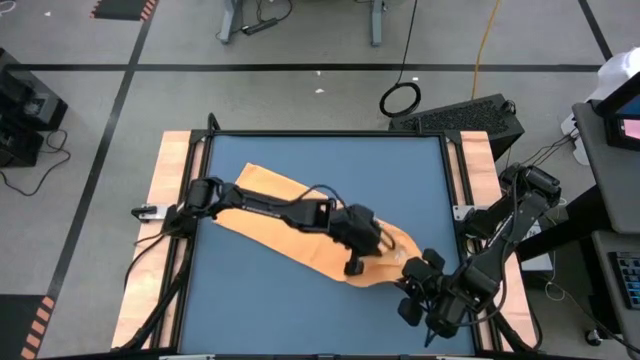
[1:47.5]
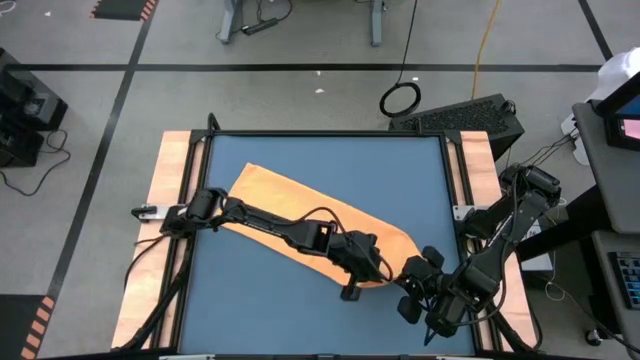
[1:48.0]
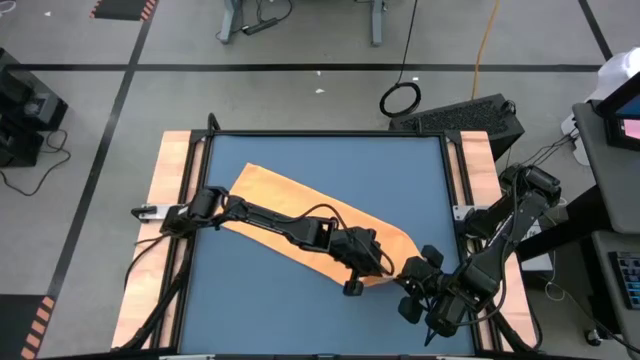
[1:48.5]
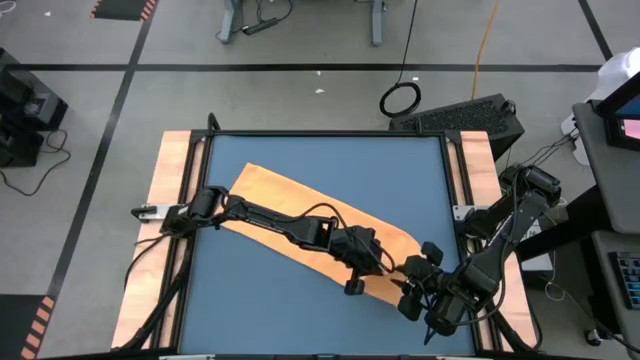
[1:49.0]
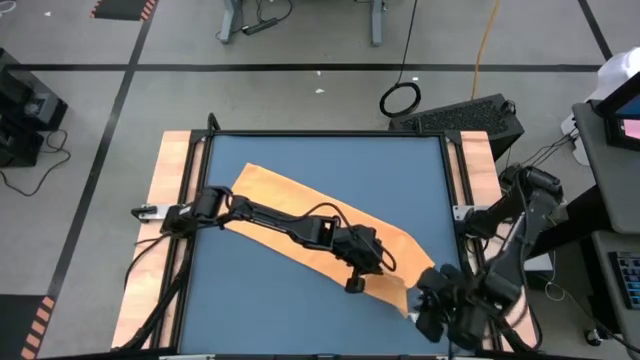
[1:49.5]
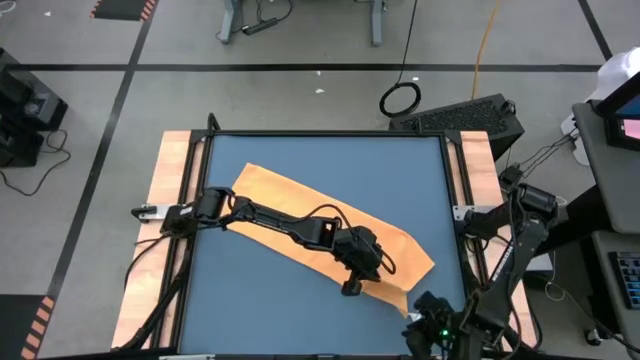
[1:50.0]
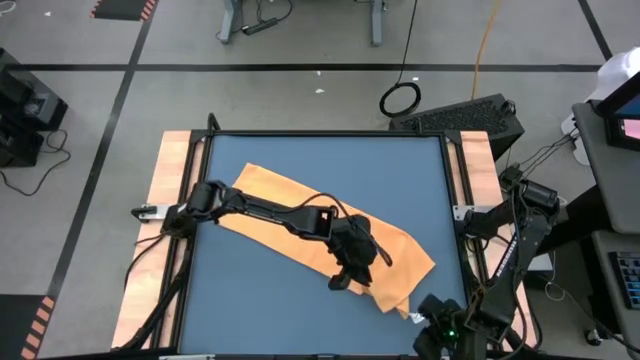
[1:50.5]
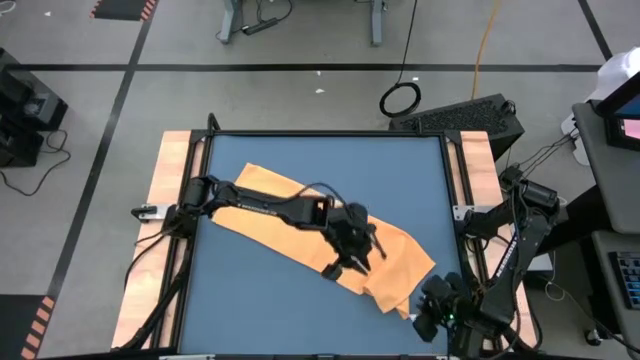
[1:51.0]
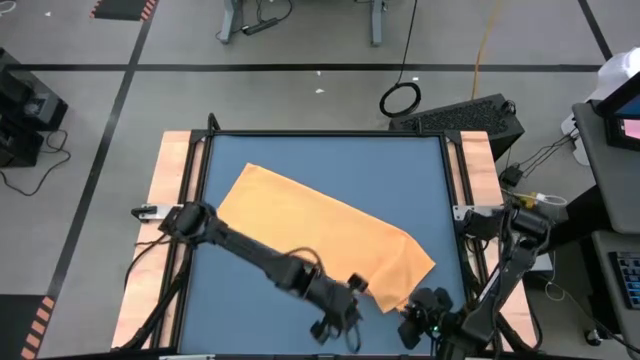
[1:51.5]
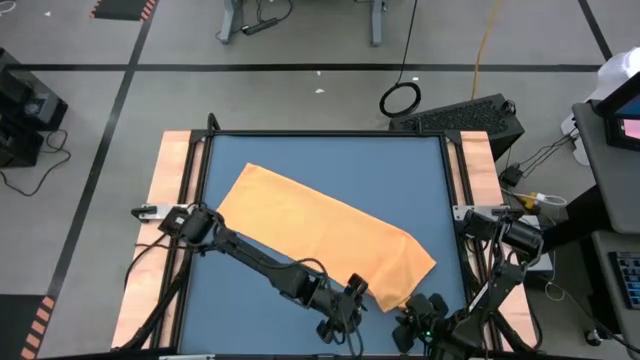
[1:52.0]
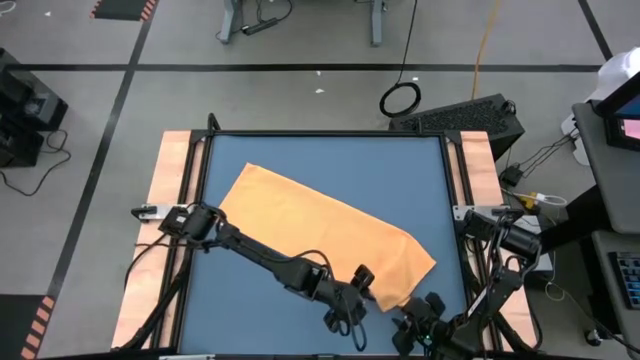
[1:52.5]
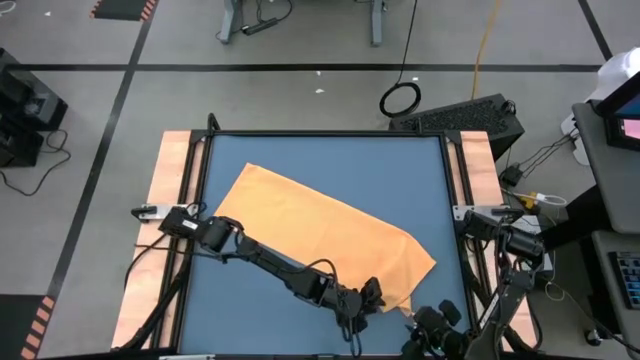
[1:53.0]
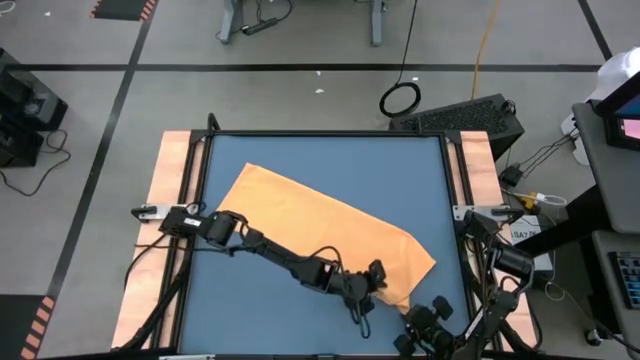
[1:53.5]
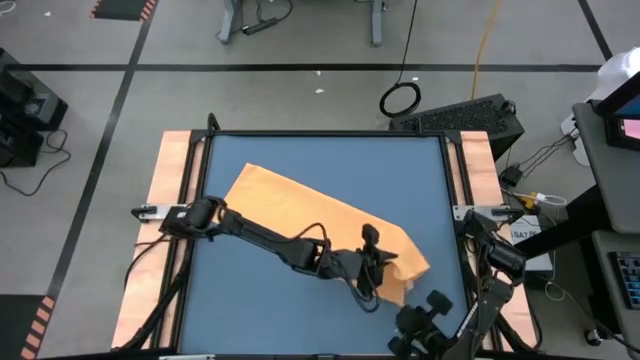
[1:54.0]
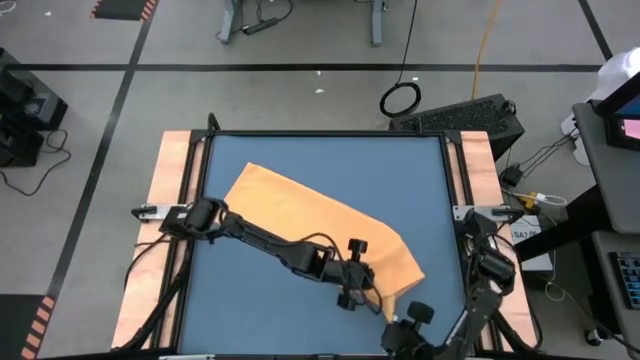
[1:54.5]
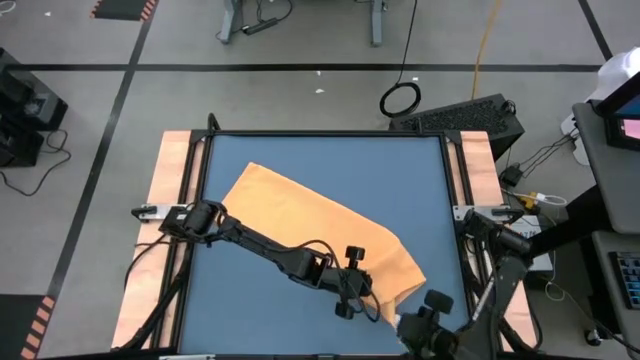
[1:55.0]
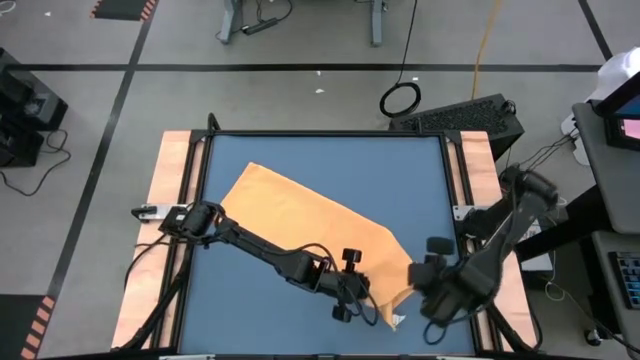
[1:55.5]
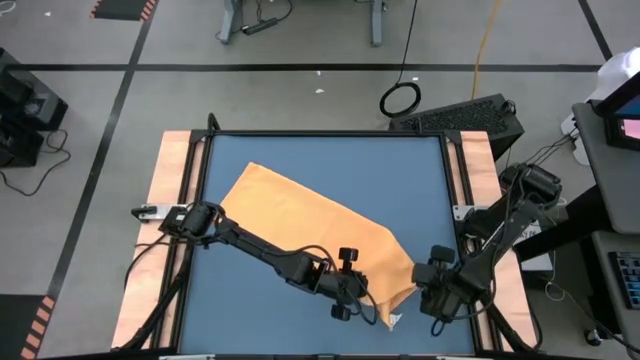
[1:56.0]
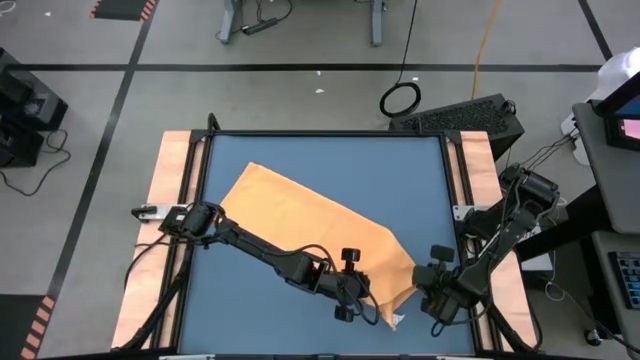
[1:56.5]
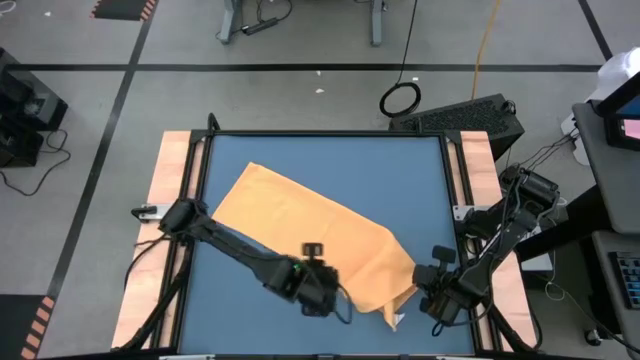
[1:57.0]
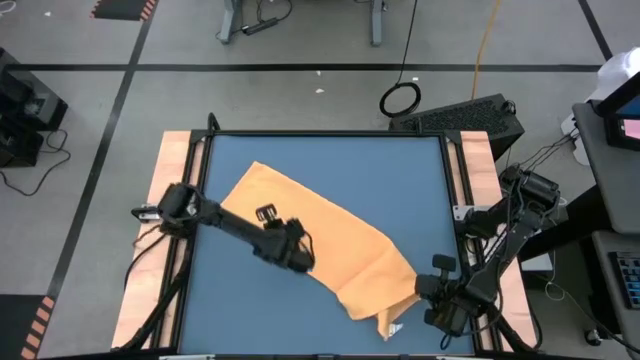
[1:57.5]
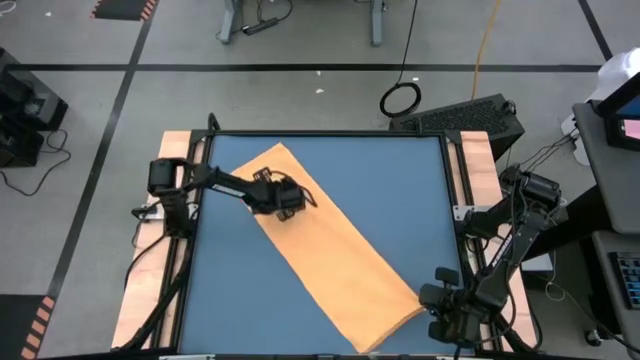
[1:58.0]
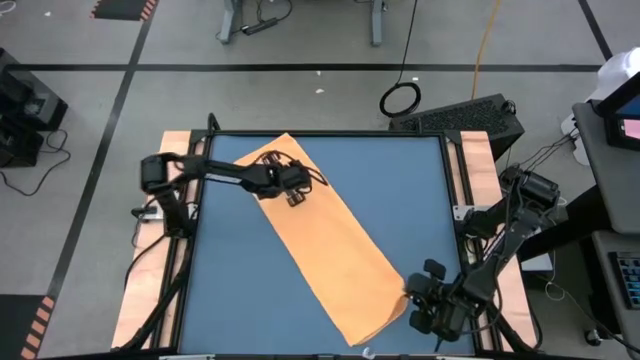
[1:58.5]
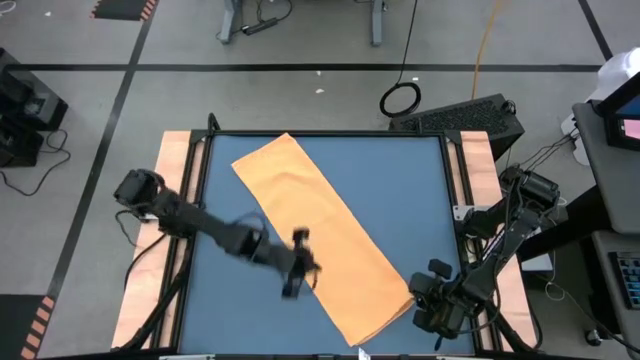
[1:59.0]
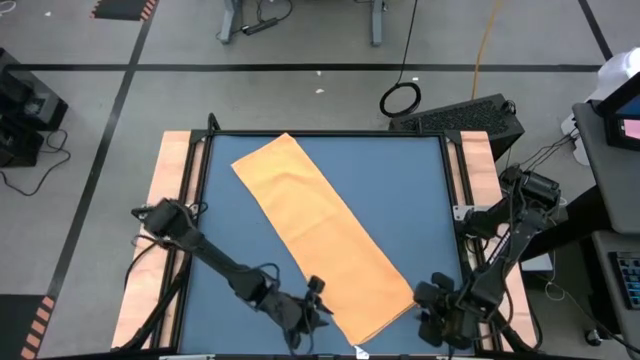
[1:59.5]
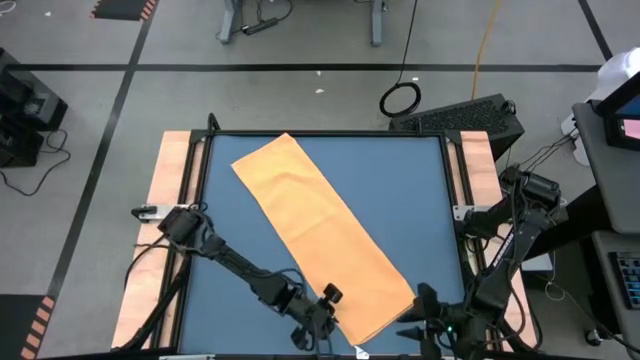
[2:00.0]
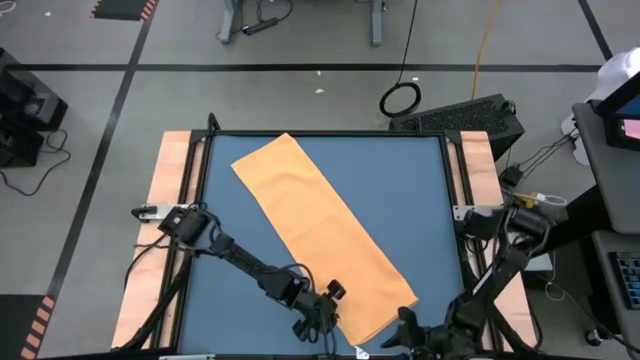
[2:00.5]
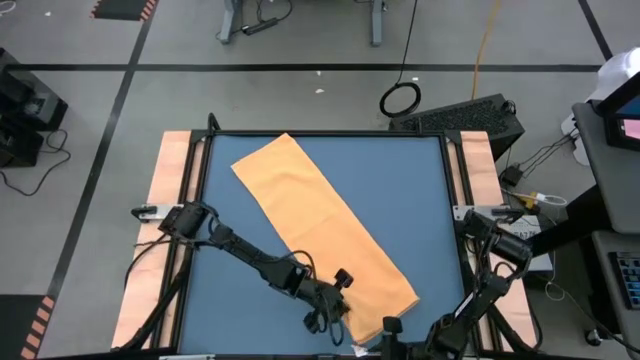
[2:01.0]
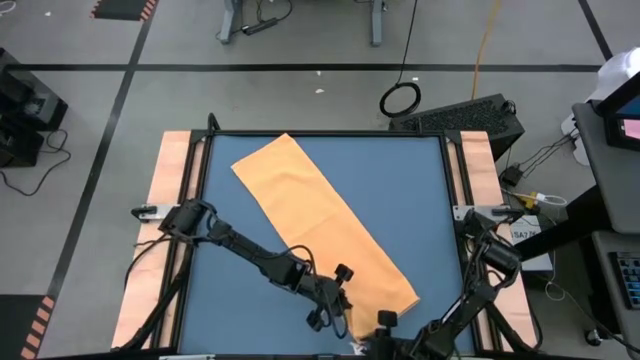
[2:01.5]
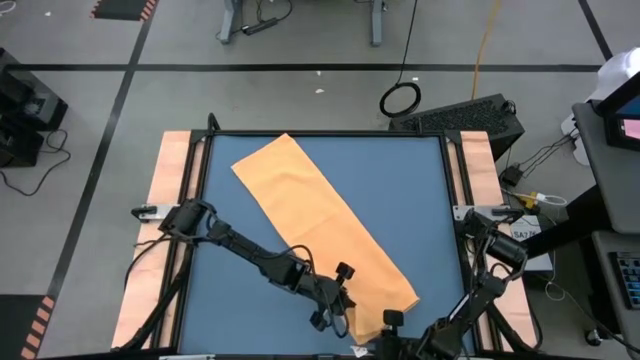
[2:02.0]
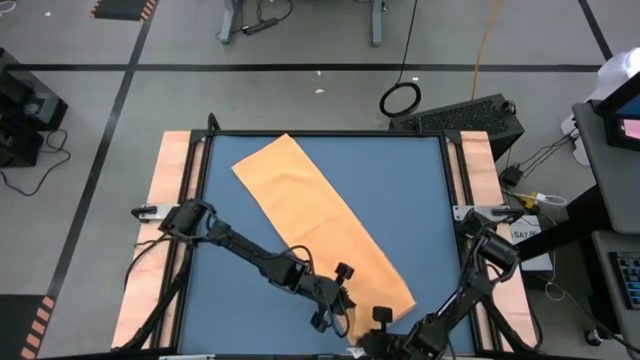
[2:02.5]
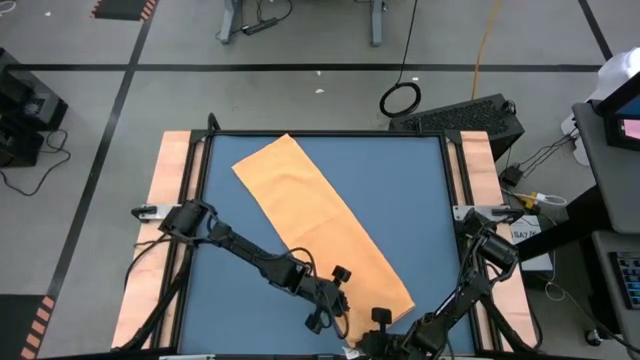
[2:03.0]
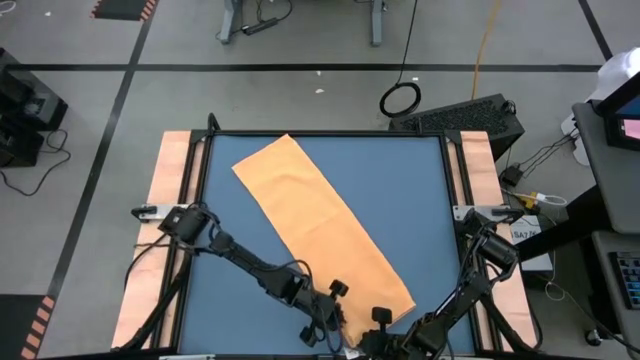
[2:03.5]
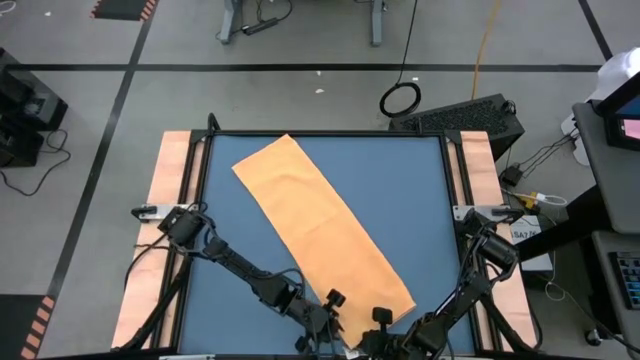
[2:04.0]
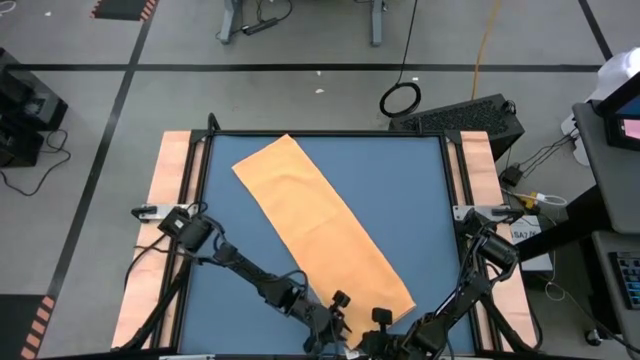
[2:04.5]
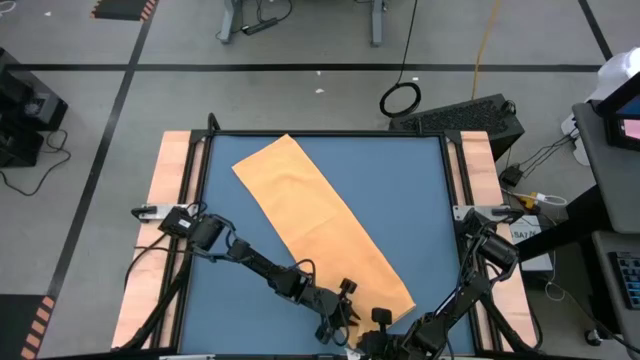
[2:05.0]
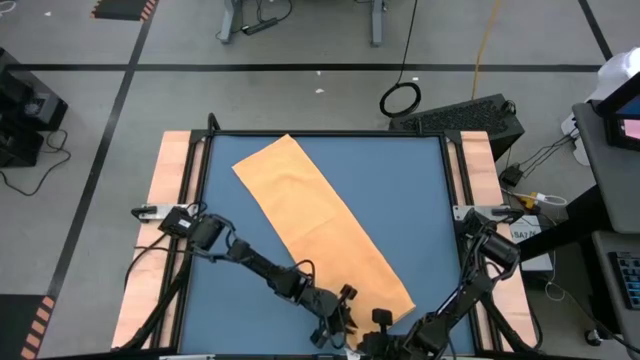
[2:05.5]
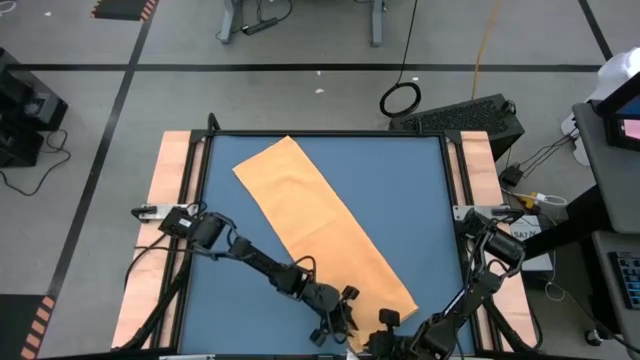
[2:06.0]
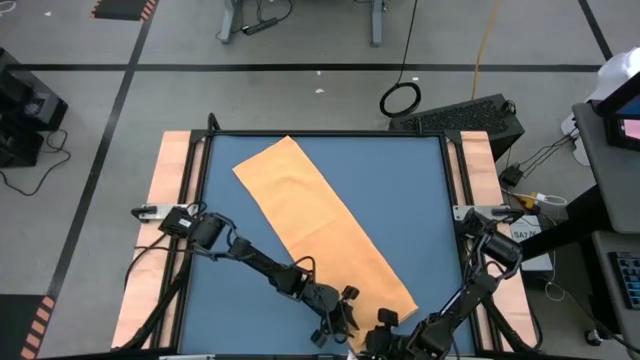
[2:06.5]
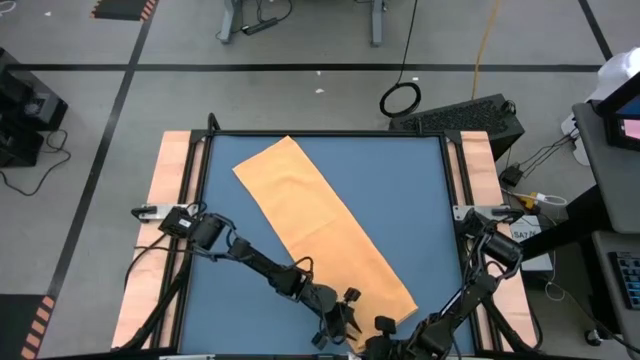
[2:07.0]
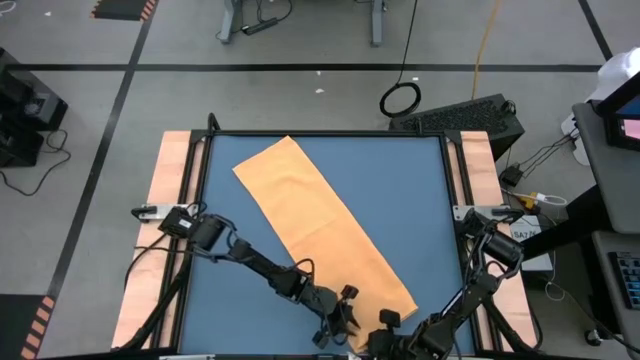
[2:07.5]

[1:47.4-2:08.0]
Task: Roll towel into tight, uniform cylinder
Fold the orange microfiber cloth

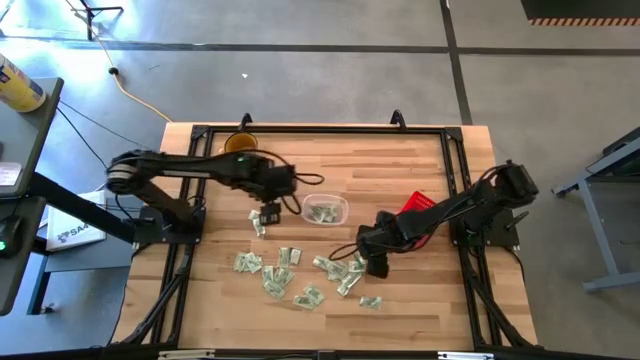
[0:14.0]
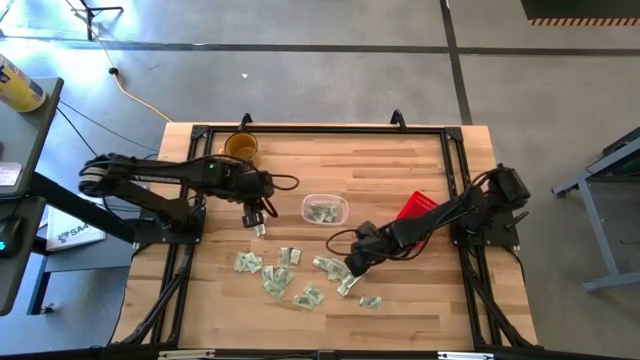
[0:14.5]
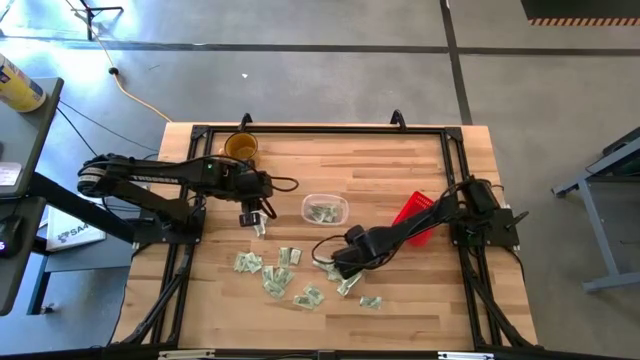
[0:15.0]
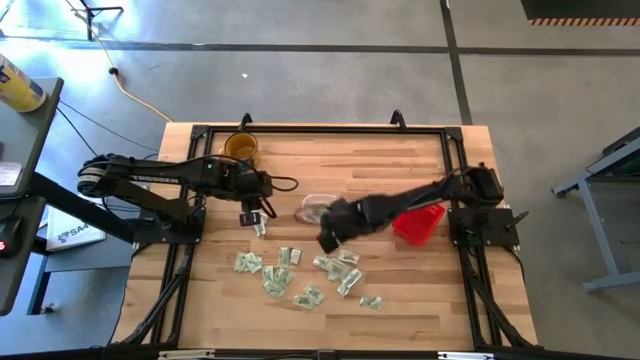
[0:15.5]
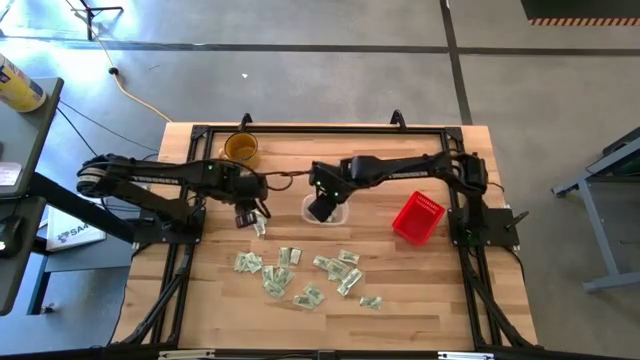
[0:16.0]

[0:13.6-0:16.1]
Task: Pick and place items into bin
Put the right green stevia packet into the transparent bin
